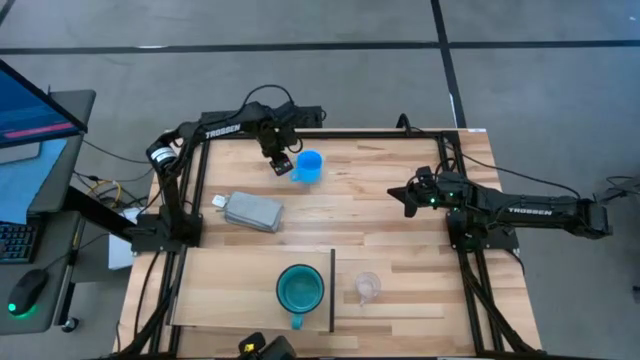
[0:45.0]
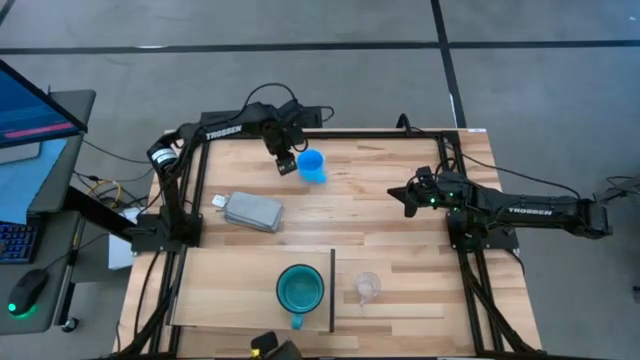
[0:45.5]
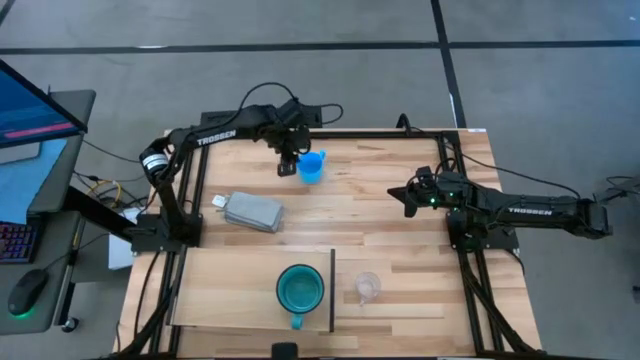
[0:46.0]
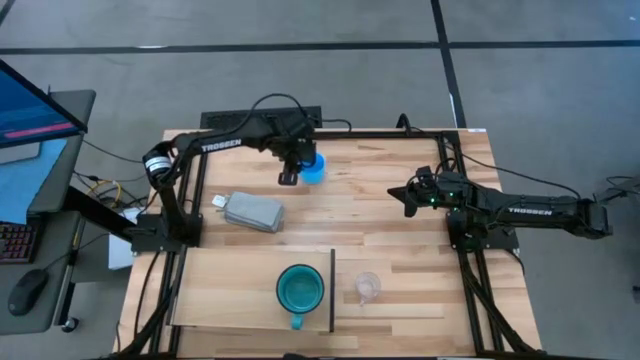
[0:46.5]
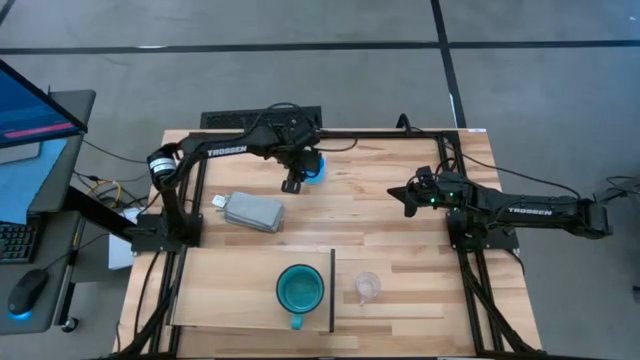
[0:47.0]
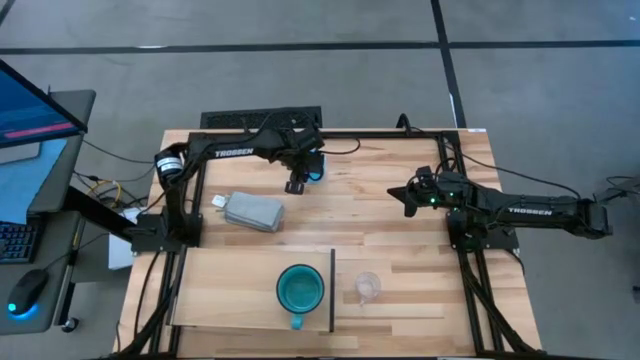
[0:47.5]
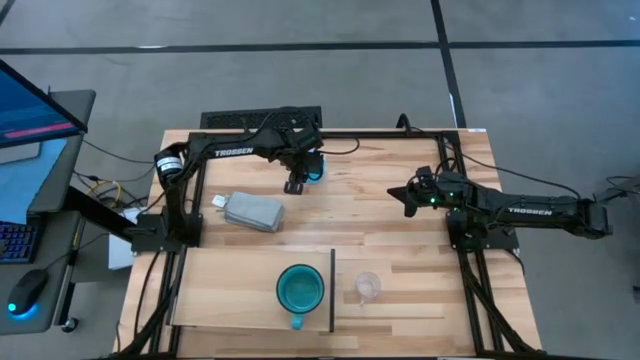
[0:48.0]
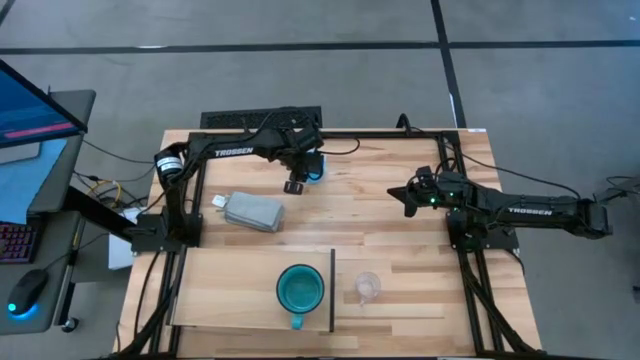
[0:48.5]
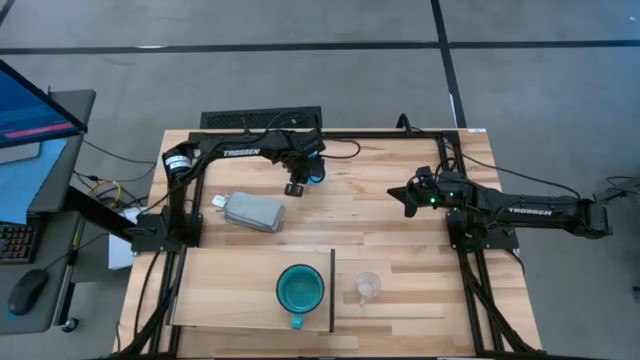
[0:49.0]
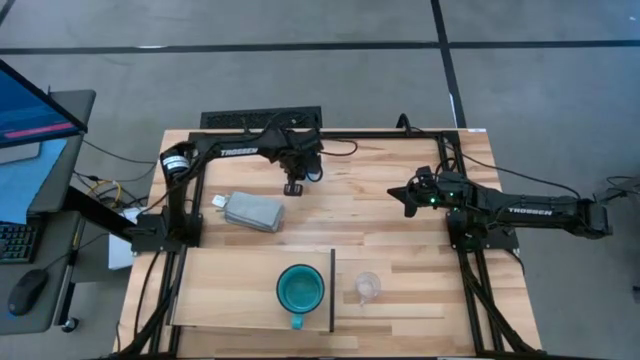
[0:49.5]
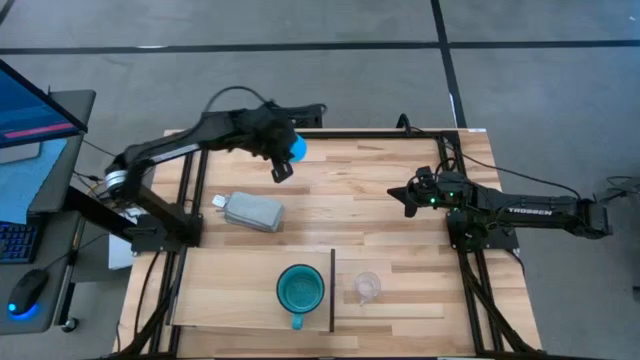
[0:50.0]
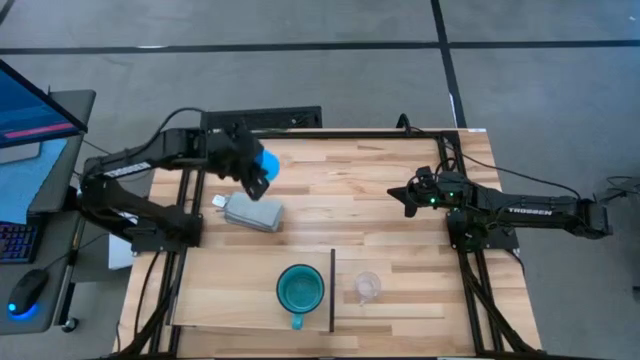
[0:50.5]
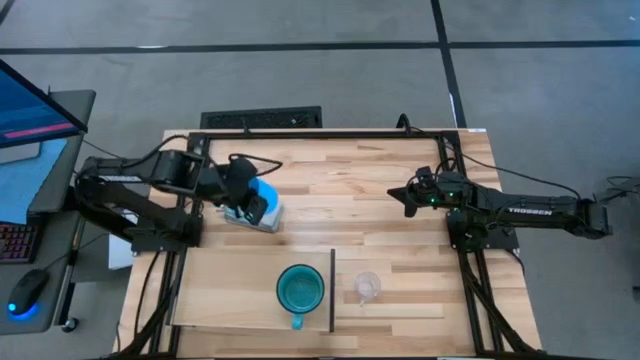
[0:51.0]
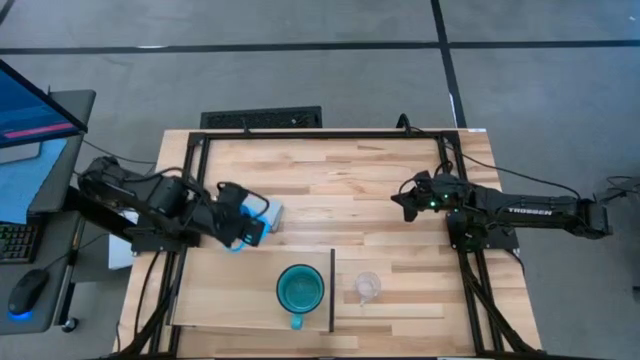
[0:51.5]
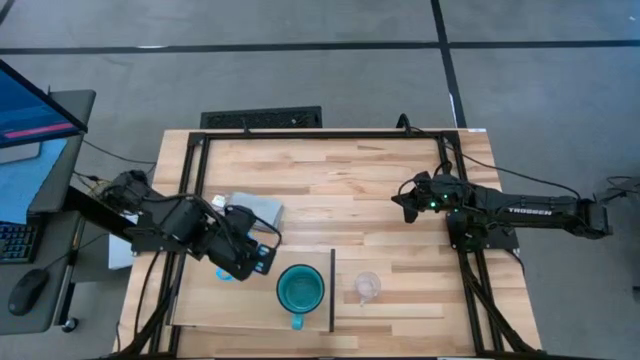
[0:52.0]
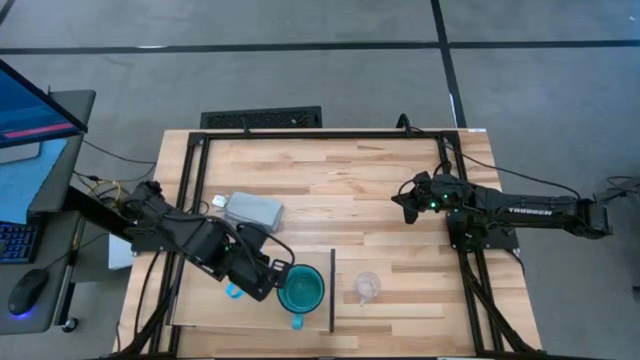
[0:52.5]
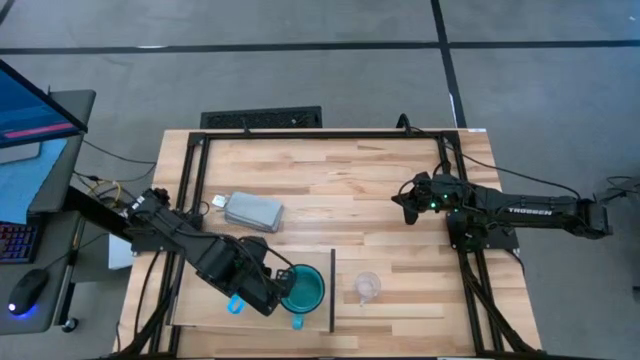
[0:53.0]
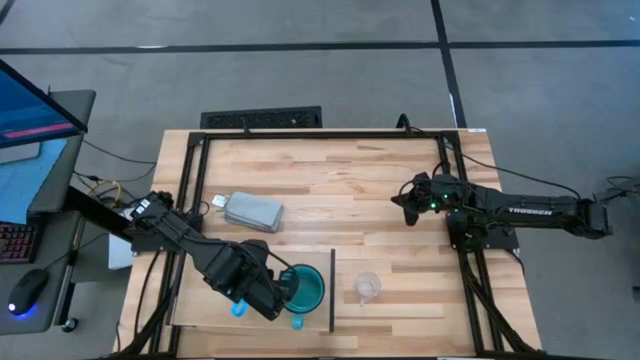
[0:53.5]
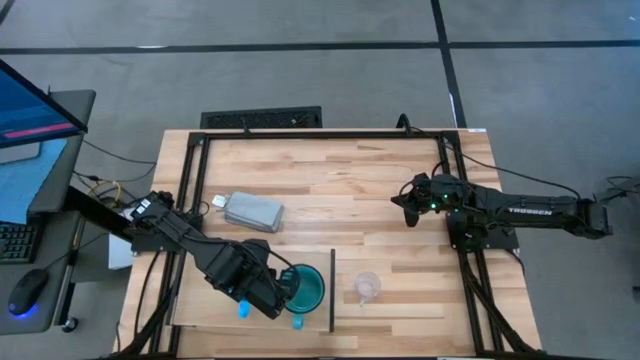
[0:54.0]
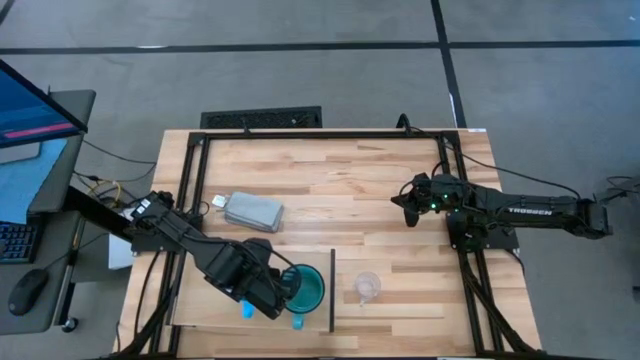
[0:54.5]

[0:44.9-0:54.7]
Task: Stack small to large cups/mugs on shelf
Put the blue mug on the shelf

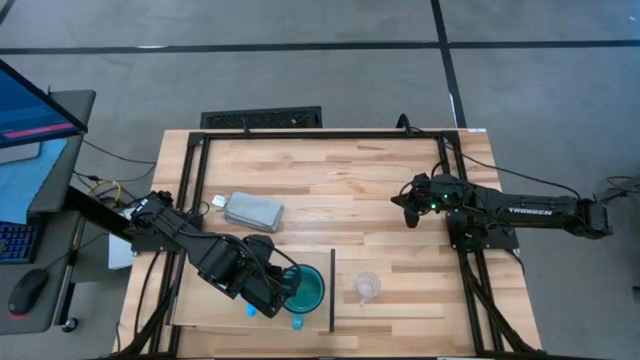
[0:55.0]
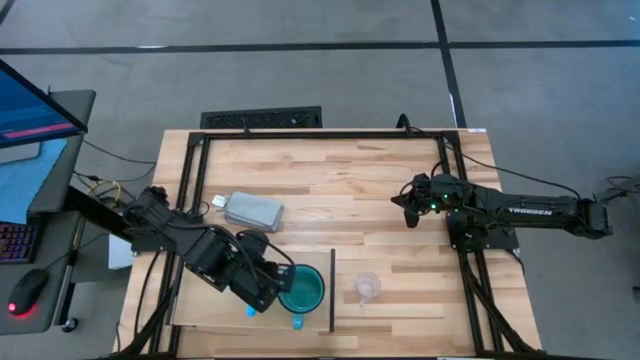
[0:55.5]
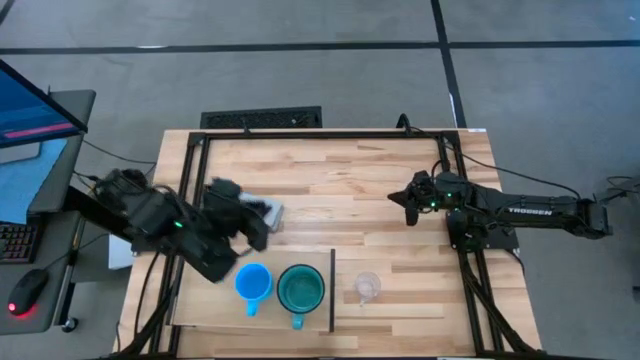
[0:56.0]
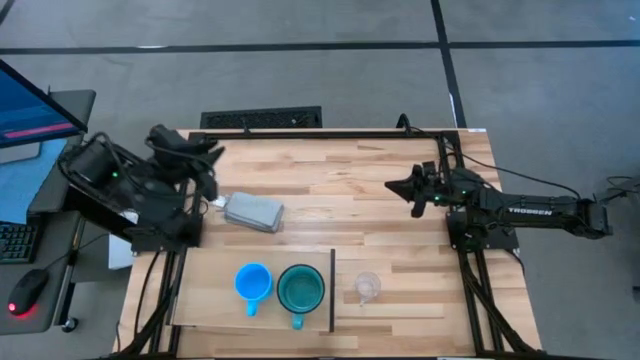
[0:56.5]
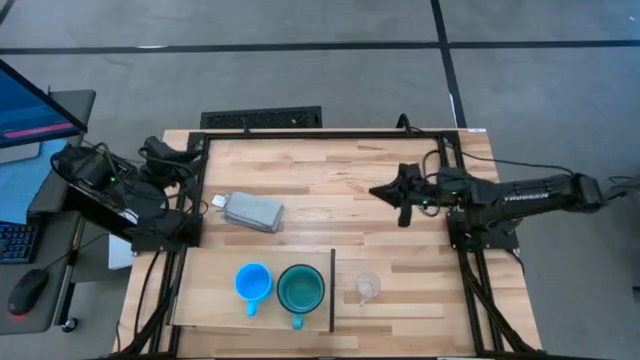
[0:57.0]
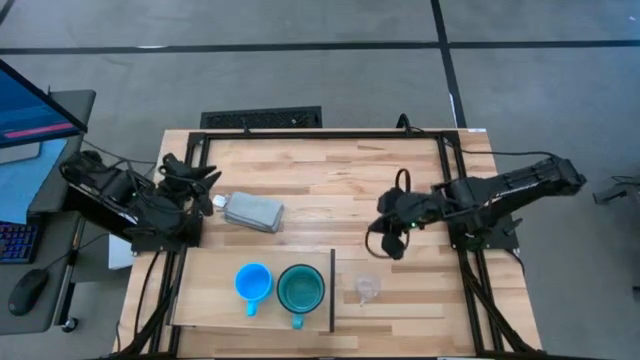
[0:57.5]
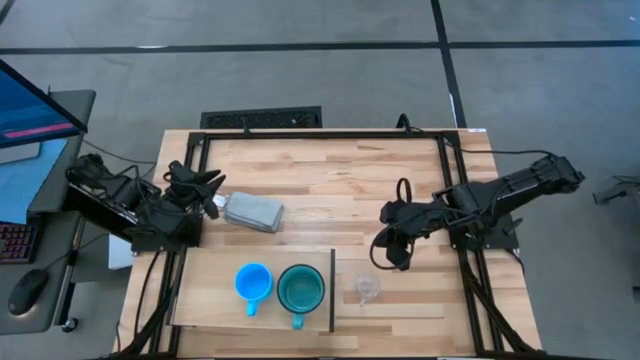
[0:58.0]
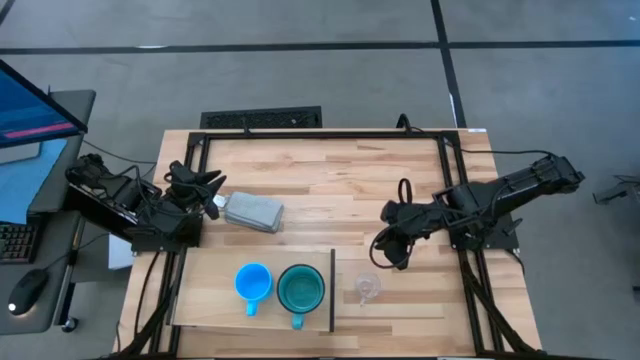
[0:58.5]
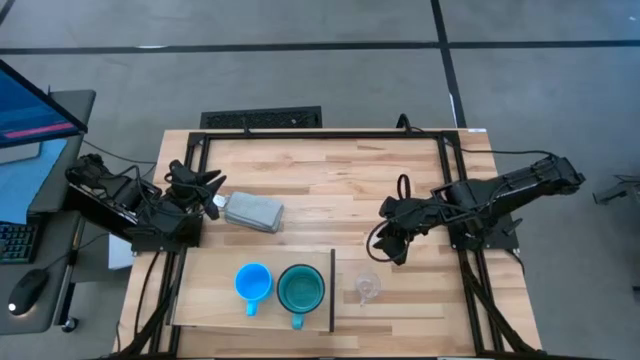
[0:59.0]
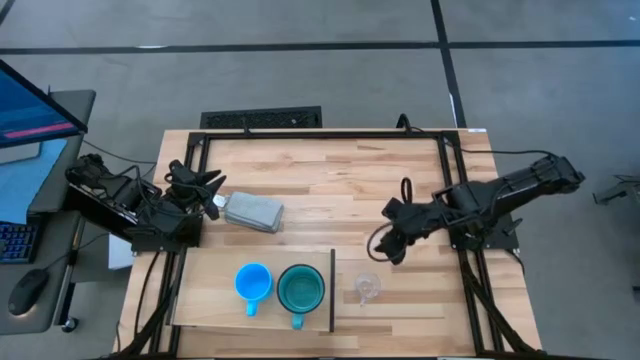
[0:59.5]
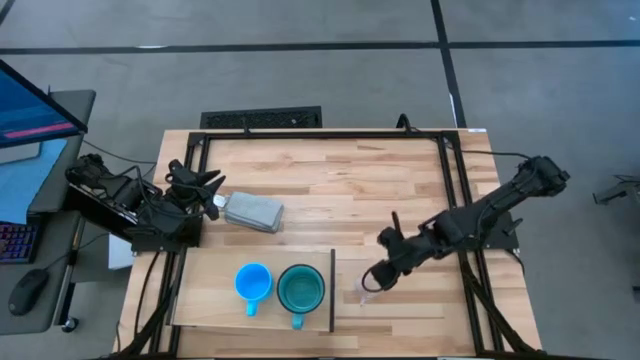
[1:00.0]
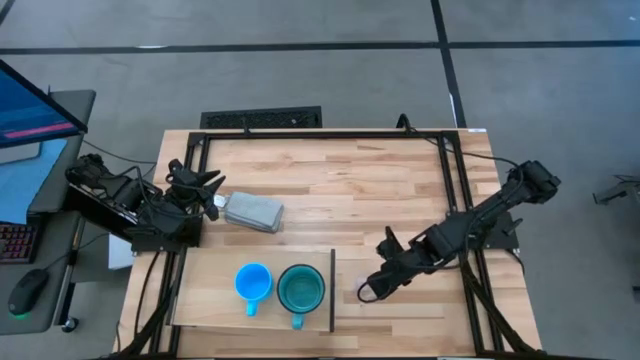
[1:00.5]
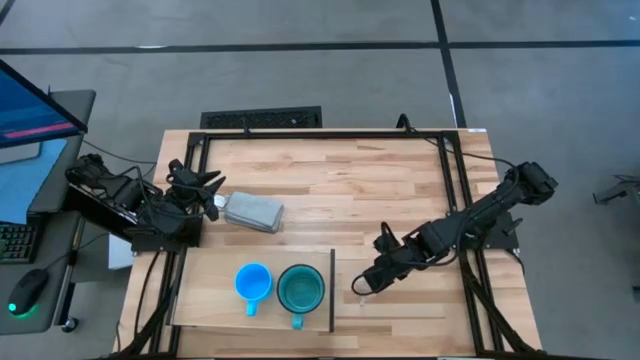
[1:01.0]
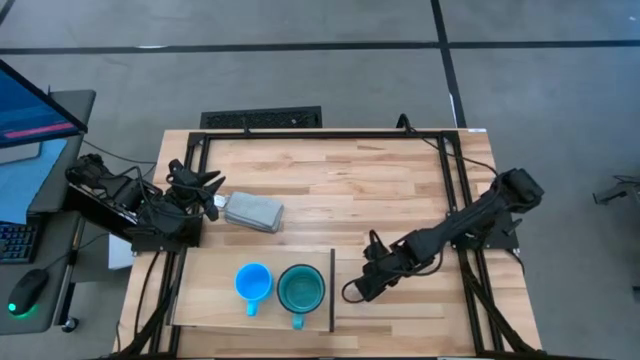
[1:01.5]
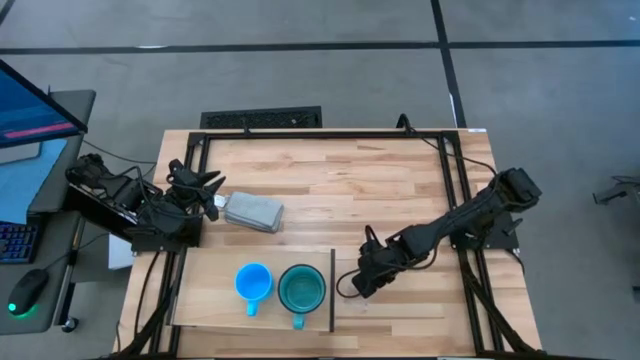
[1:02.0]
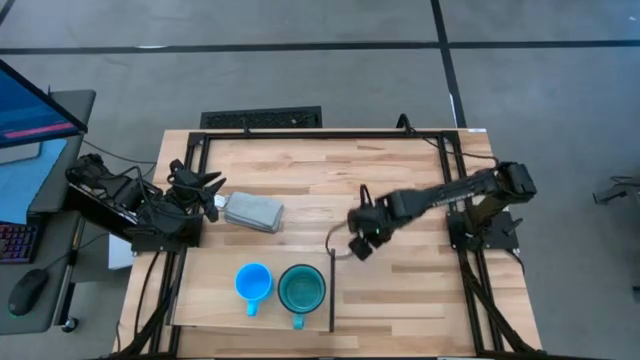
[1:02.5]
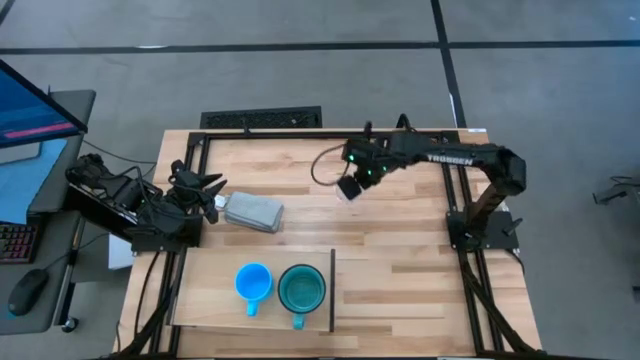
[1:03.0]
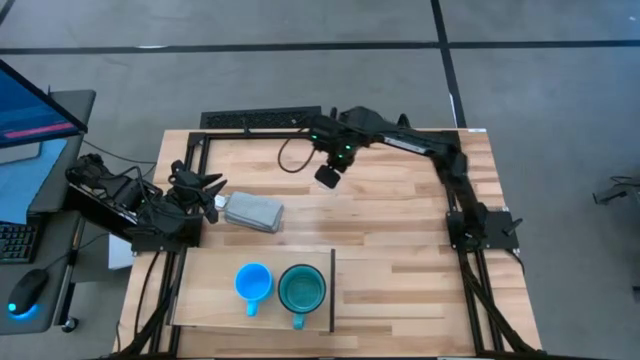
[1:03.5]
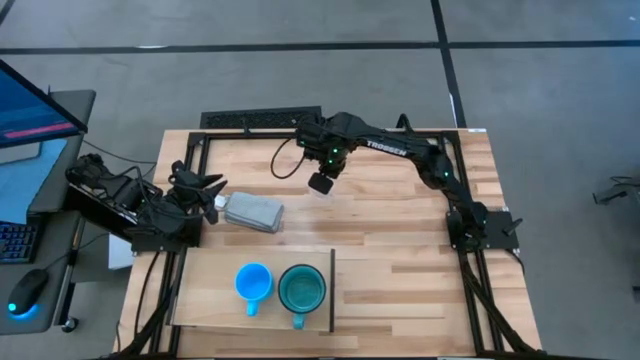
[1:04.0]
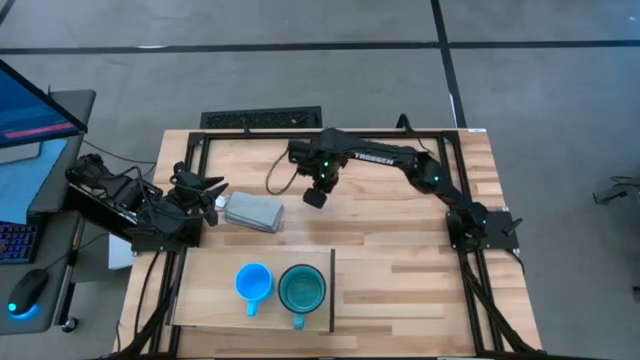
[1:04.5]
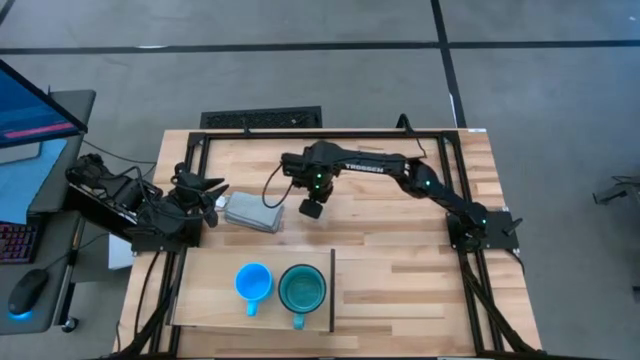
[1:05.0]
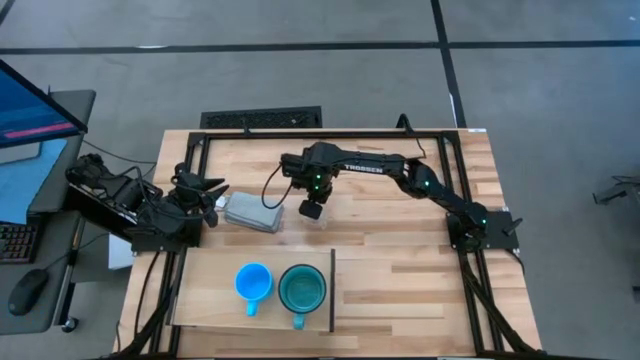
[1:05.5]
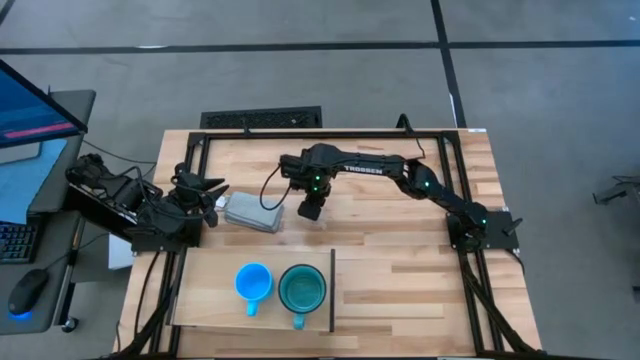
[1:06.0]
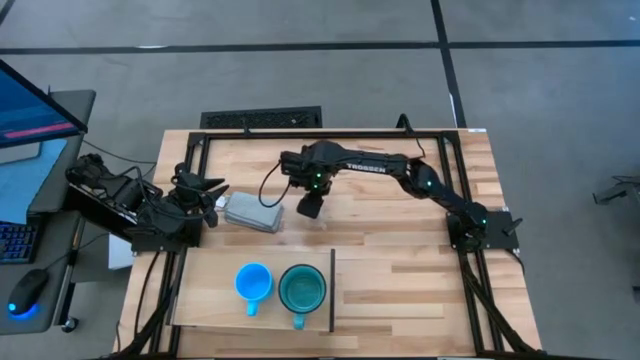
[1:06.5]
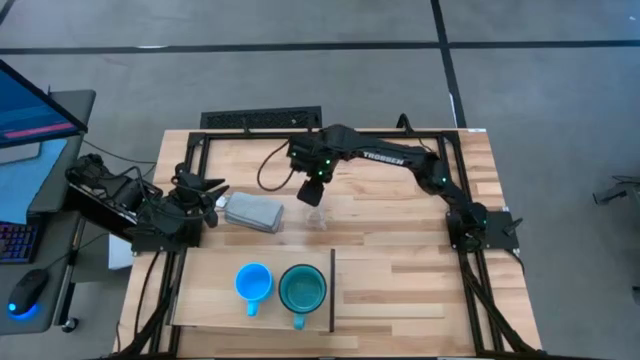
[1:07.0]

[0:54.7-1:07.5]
Put the transparent mug on the shelf
